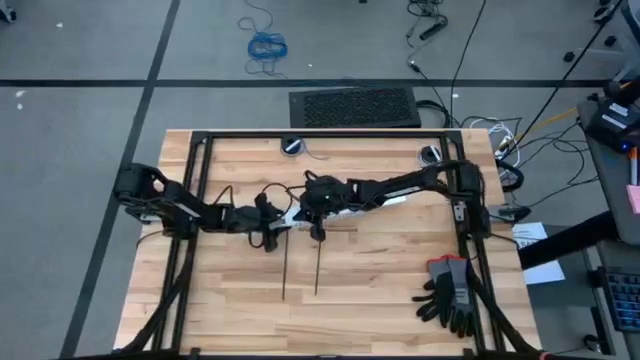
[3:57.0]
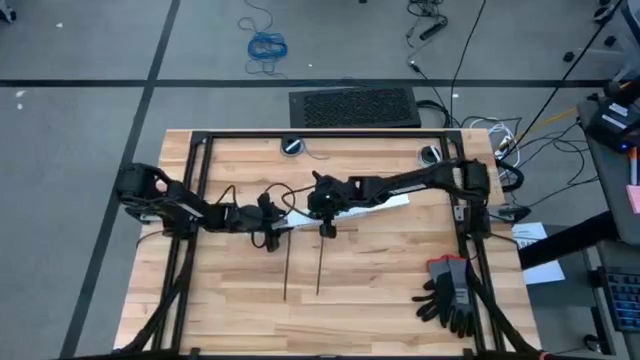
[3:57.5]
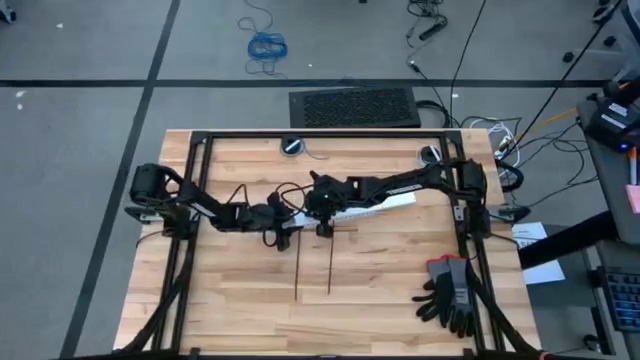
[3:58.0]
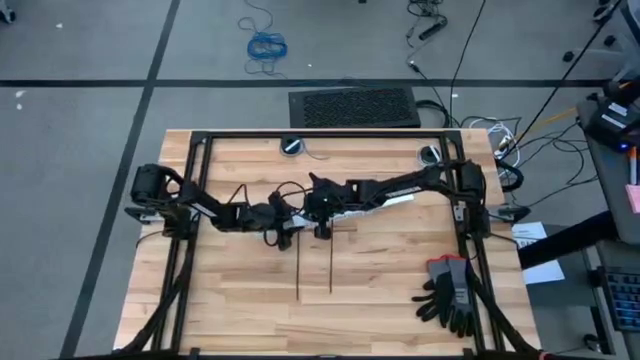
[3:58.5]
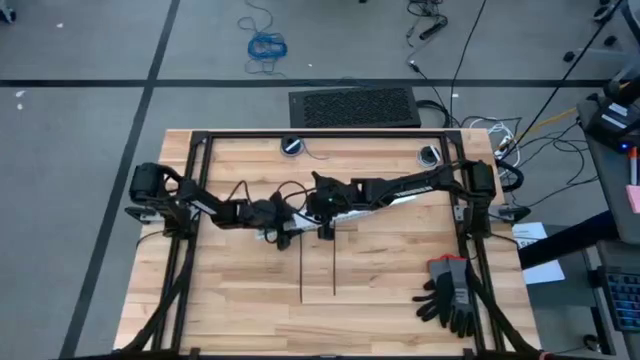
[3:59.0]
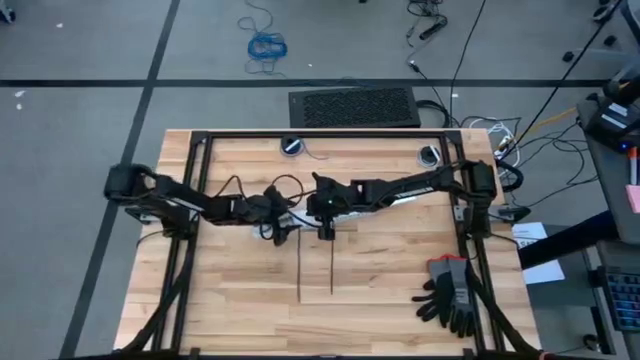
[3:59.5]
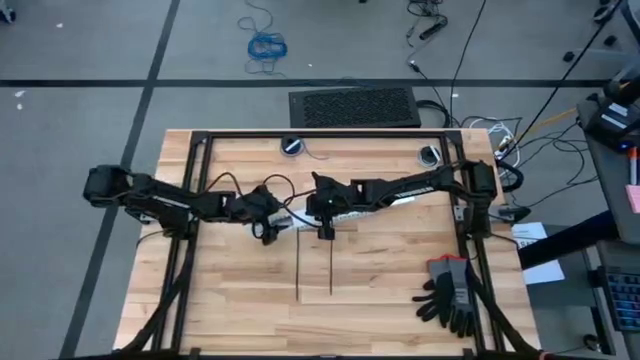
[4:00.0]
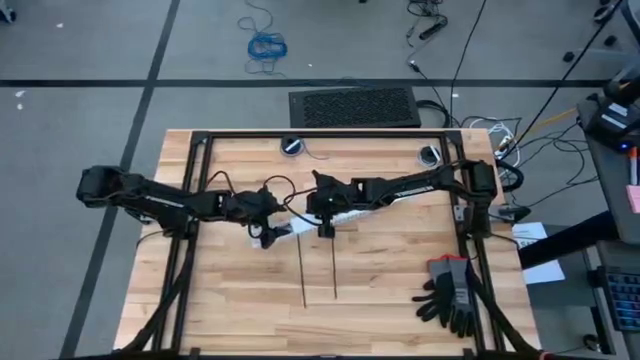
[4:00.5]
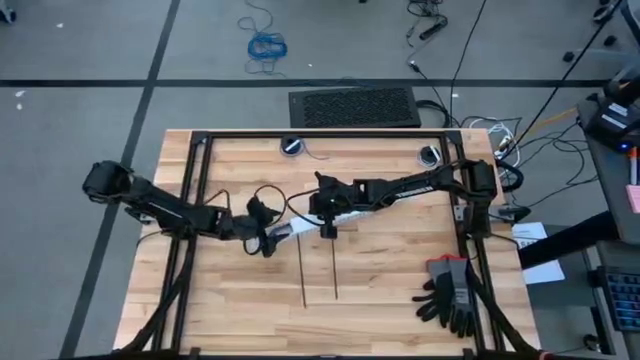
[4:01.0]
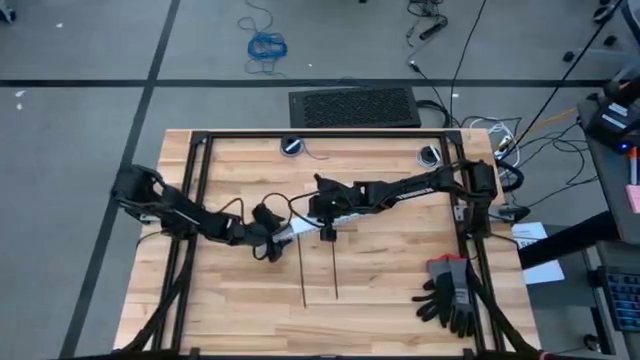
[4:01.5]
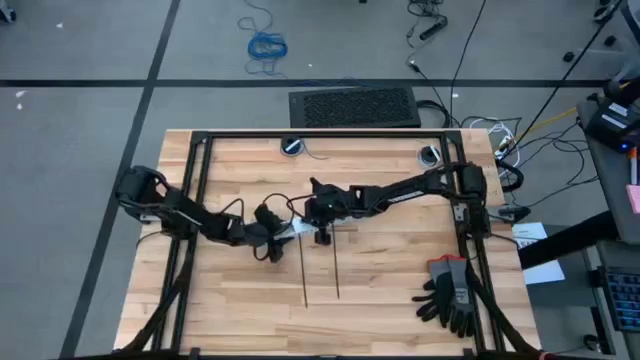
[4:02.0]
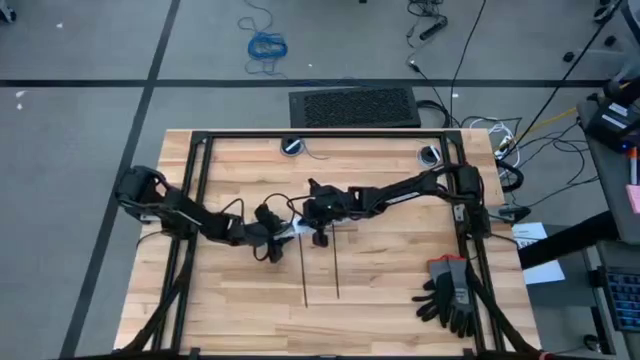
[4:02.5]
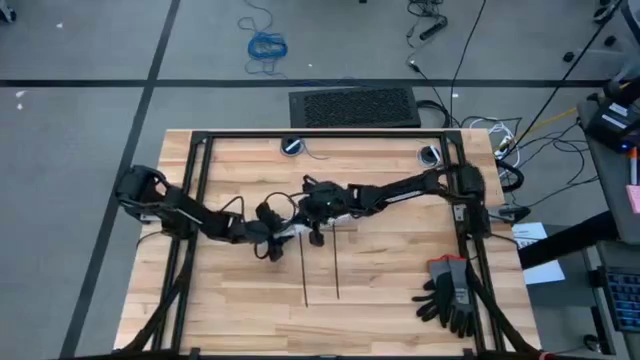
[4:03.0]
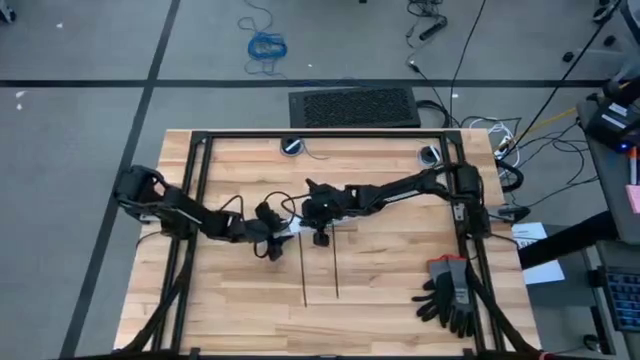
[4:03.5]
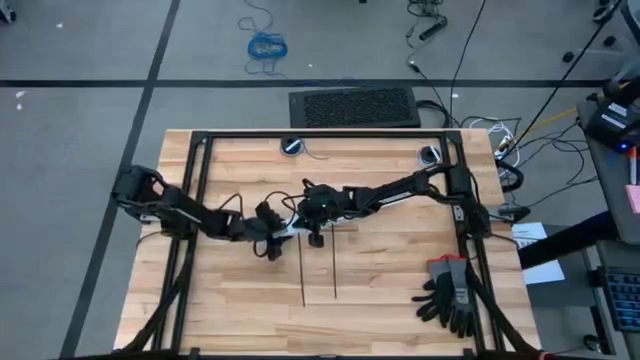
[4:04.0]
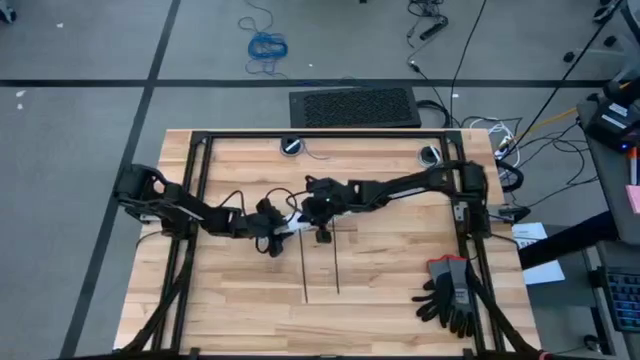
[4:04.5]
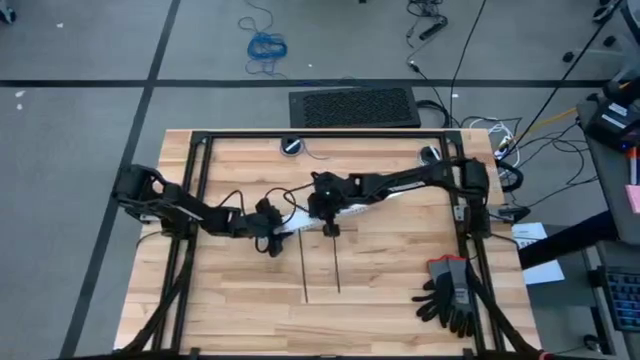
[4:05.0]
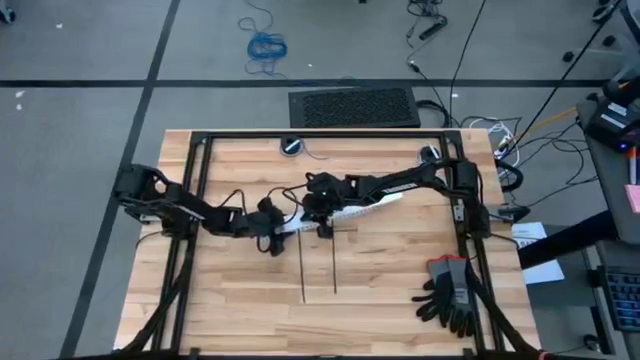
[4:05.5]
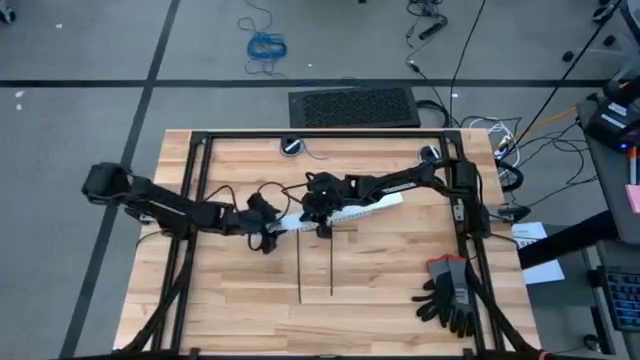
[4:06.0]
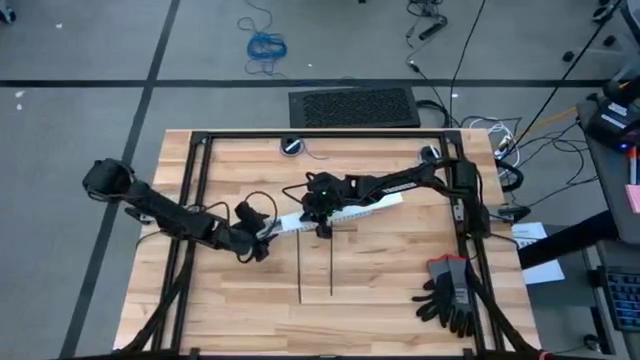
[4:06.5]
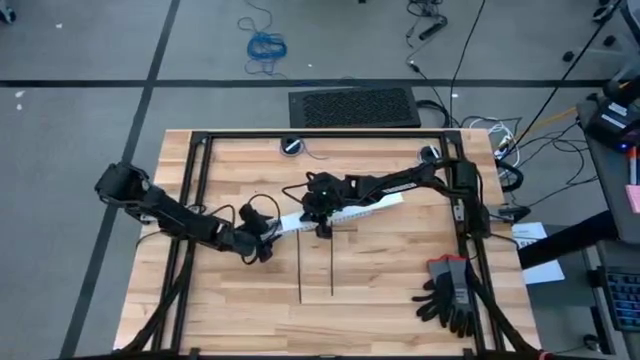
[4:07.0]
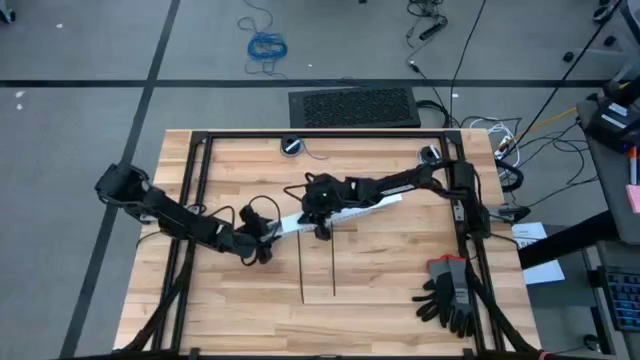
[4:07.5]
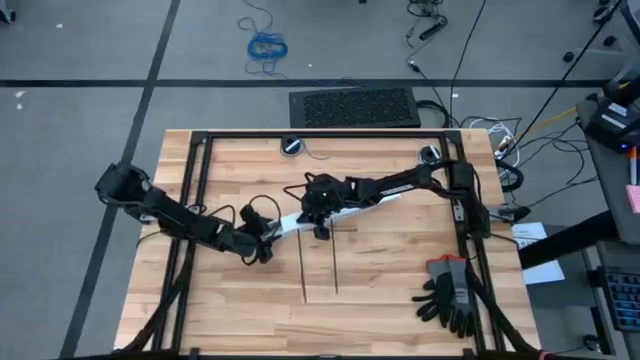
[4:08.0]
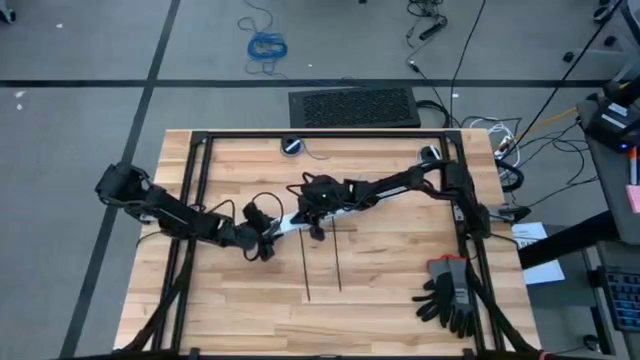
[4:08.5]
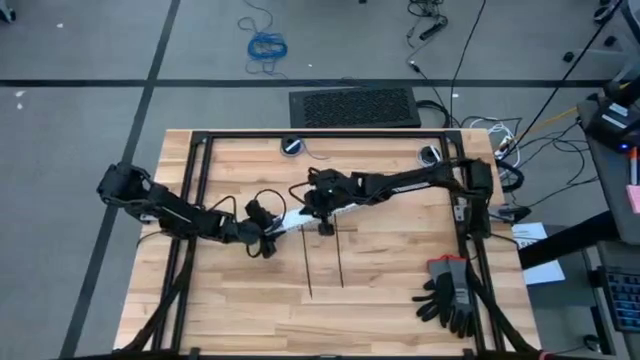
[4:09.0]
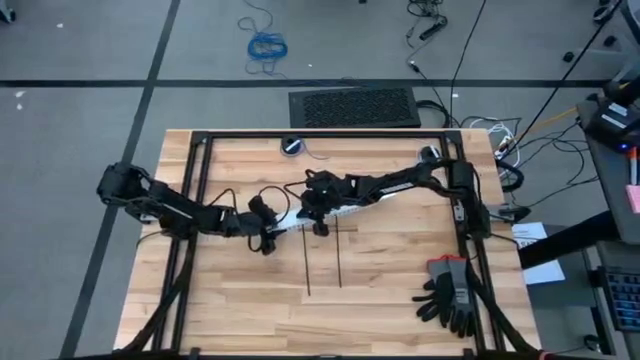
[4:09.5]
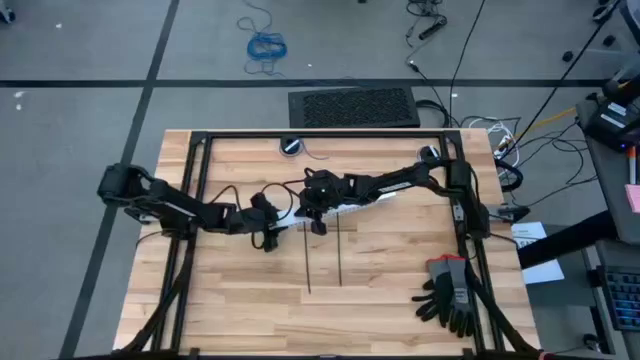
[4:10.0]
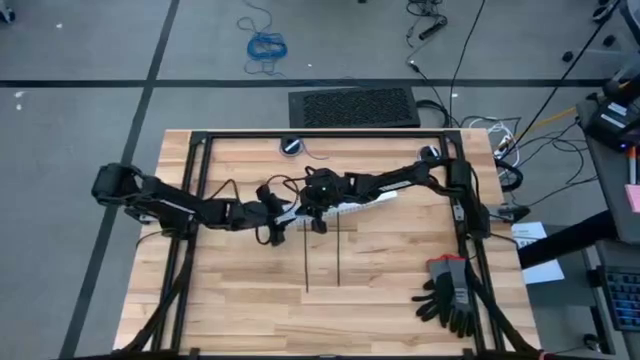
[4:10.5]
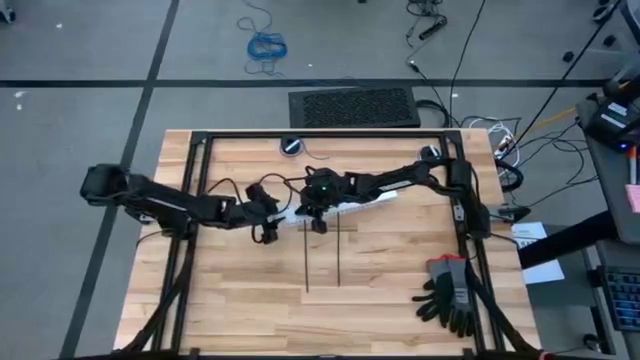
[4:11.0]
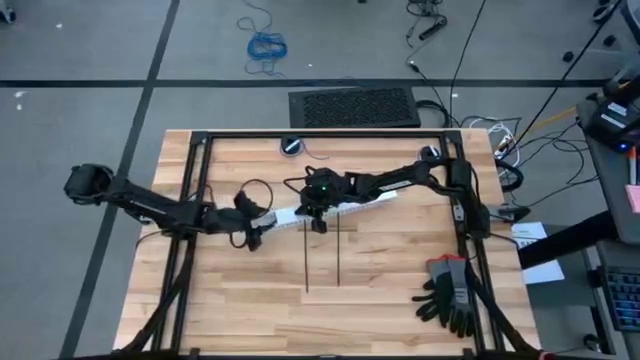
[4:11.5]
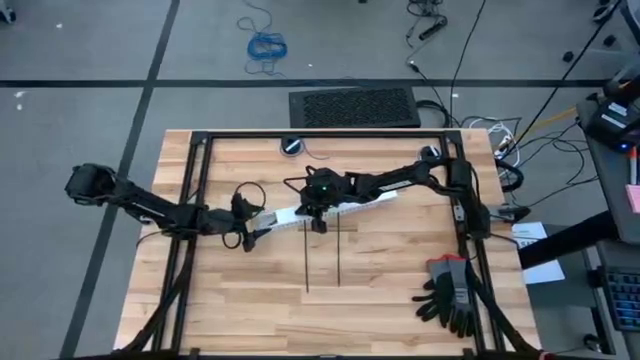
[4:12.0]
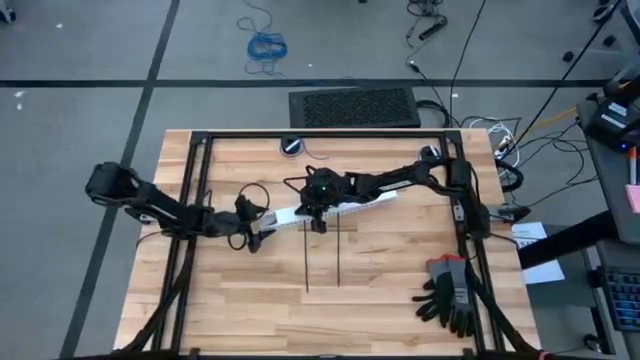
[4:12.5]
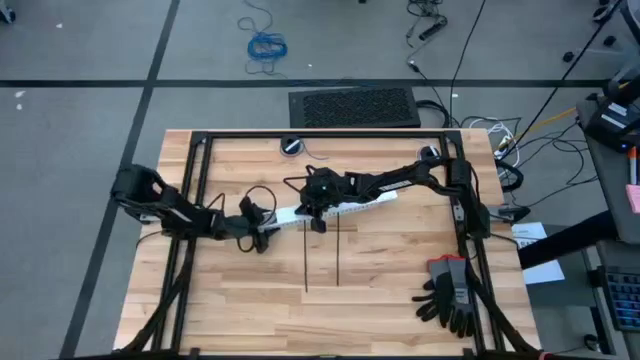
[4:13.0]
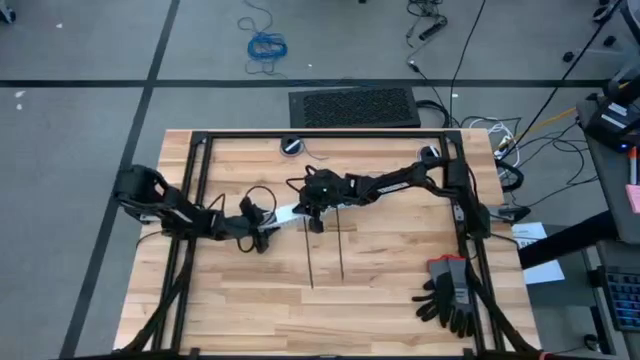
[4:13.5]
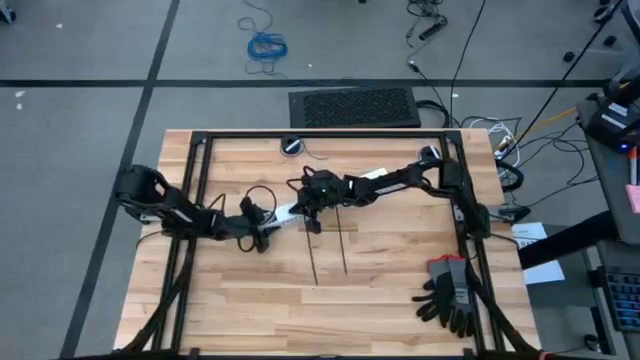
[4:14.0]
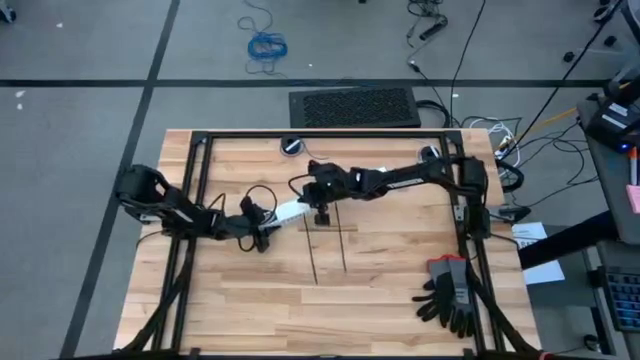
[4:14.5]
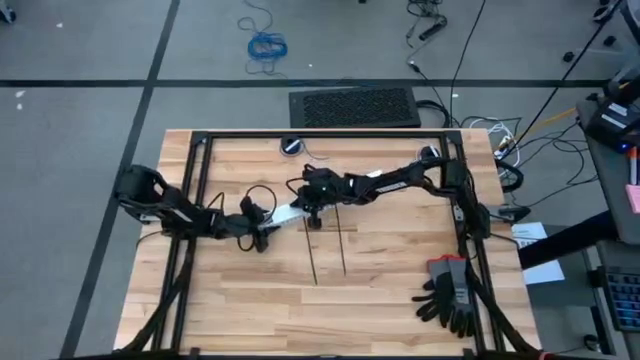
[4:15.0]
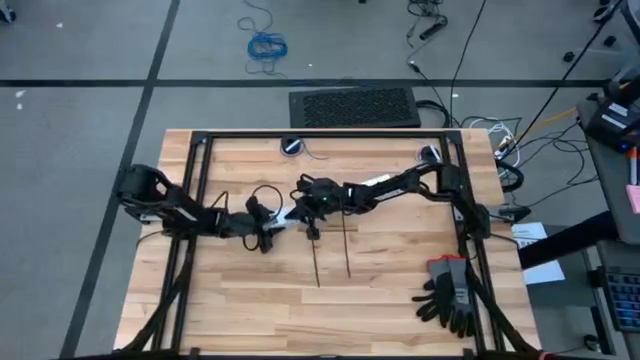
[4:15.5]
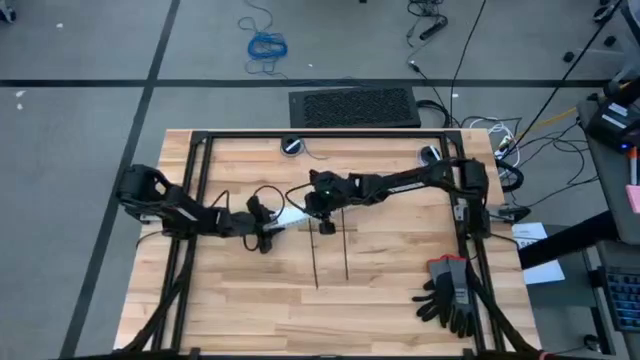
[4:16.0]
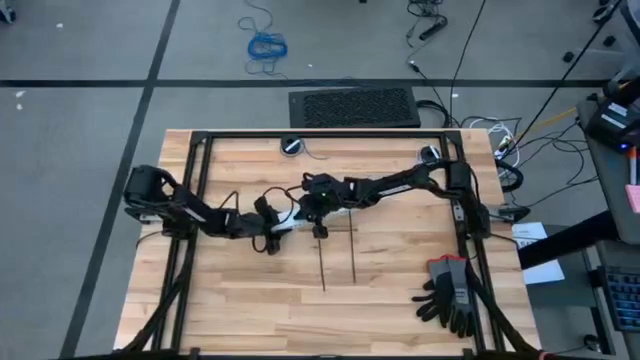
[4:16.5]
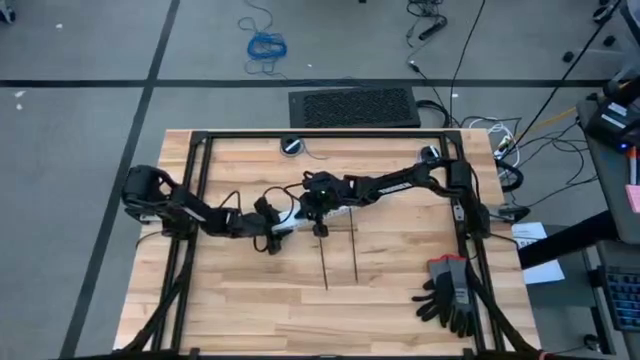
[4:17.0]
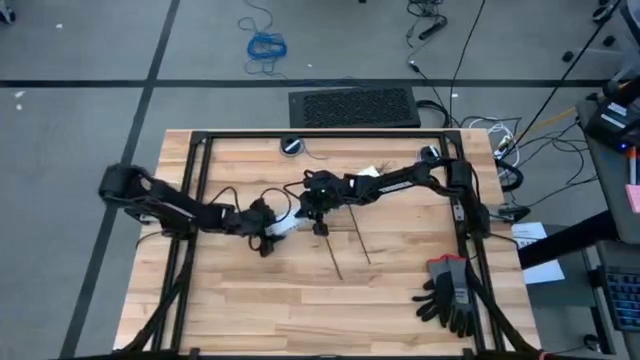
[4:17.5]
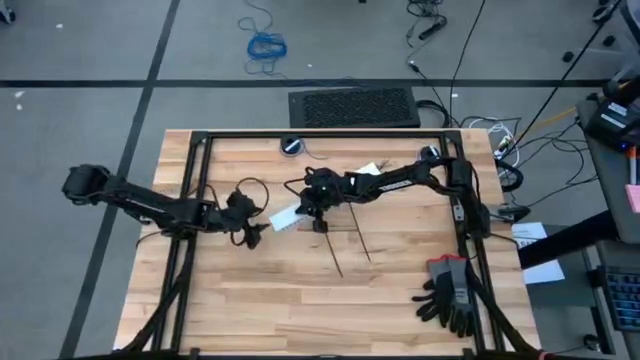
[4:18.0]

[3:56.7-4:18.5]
Task: Ziptie cables
Close the cable duct
